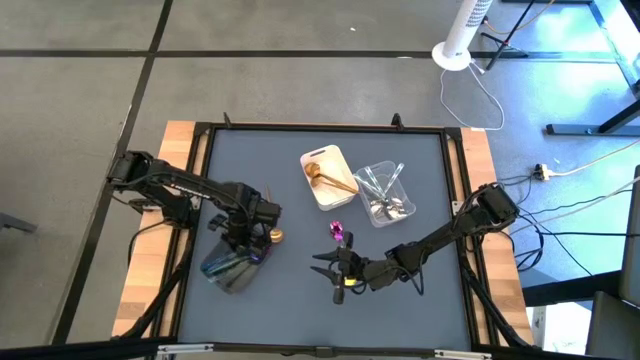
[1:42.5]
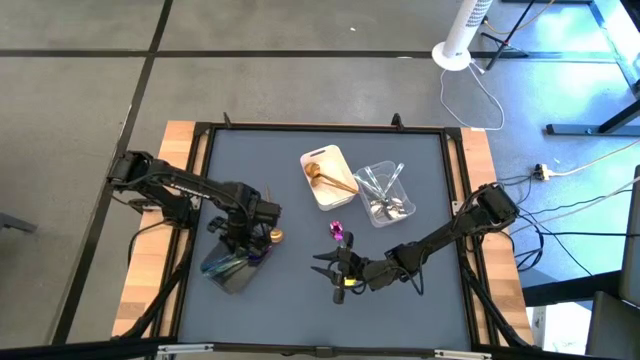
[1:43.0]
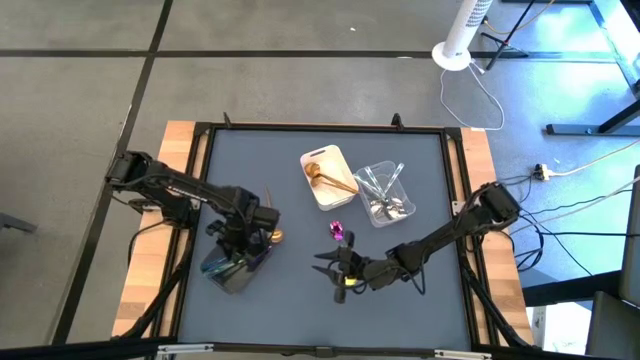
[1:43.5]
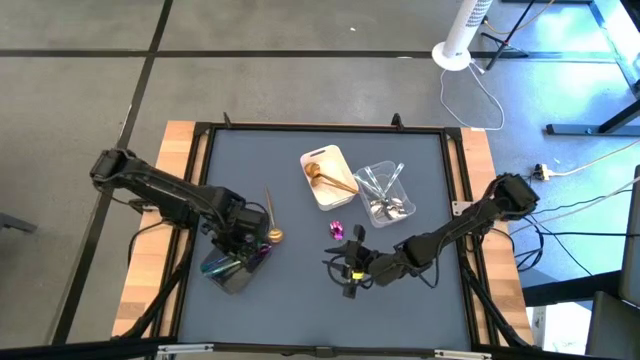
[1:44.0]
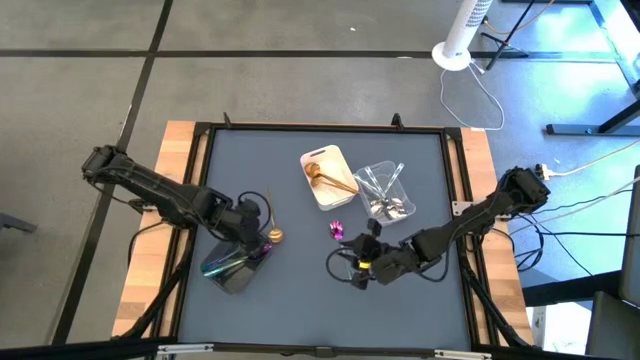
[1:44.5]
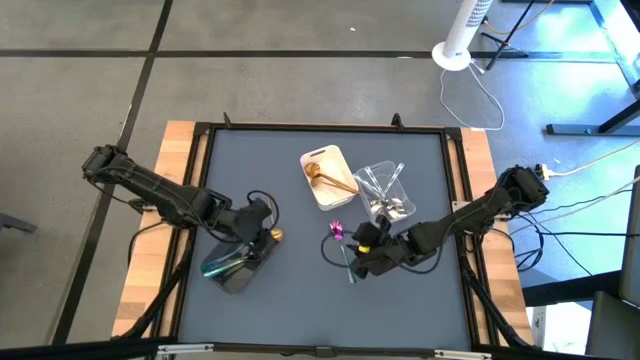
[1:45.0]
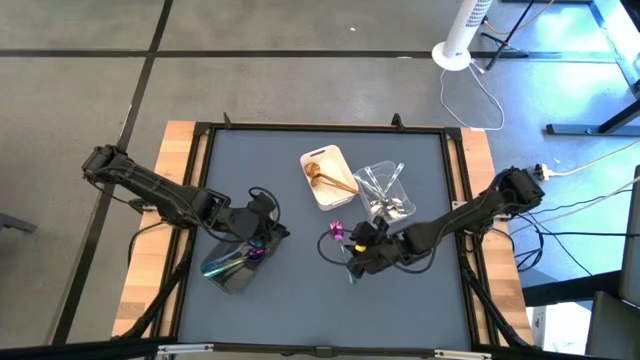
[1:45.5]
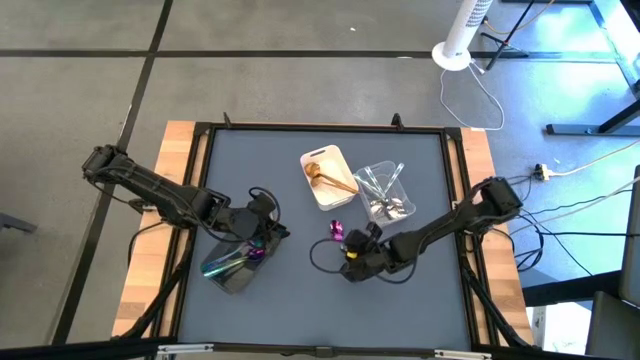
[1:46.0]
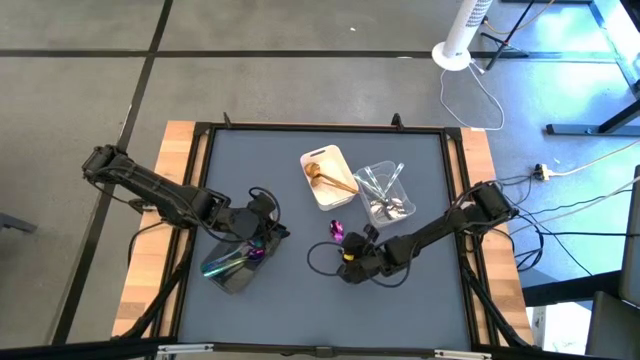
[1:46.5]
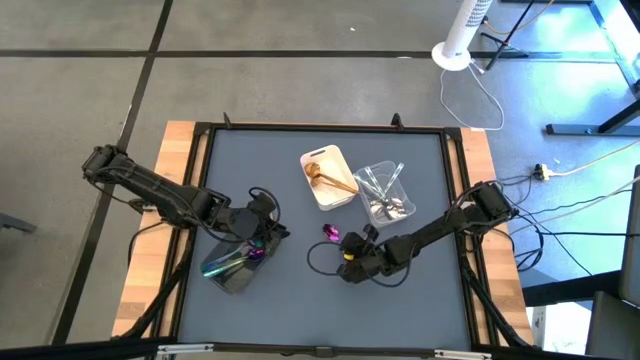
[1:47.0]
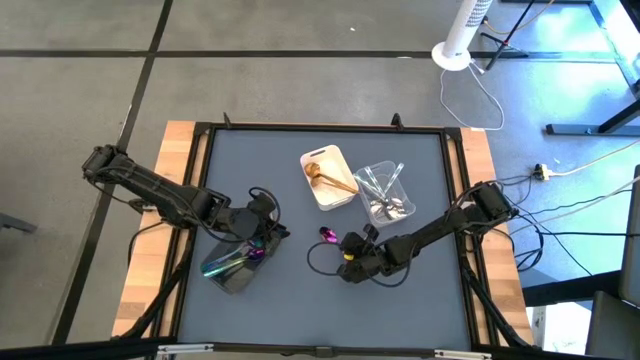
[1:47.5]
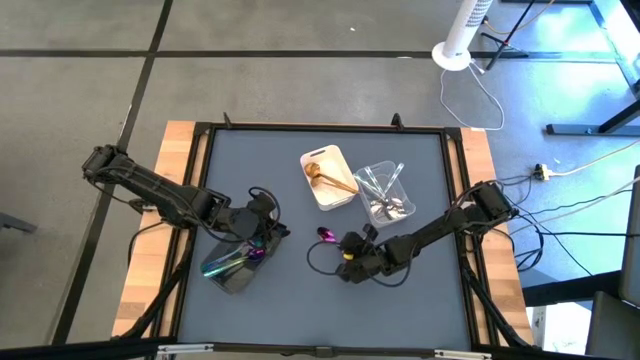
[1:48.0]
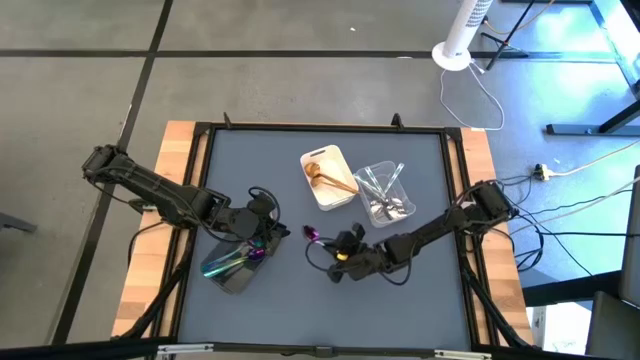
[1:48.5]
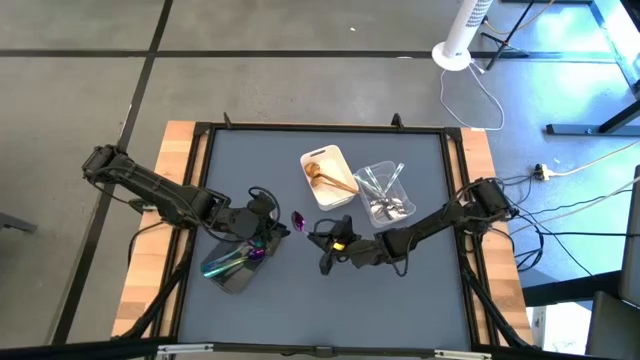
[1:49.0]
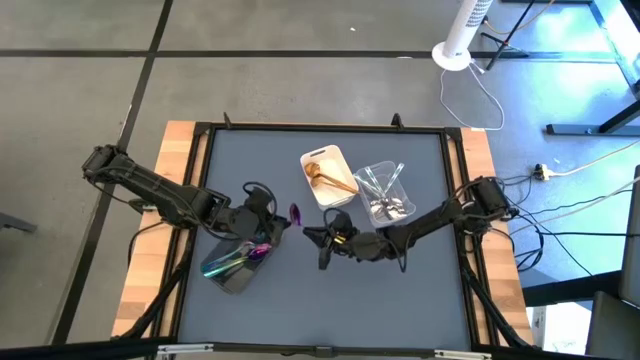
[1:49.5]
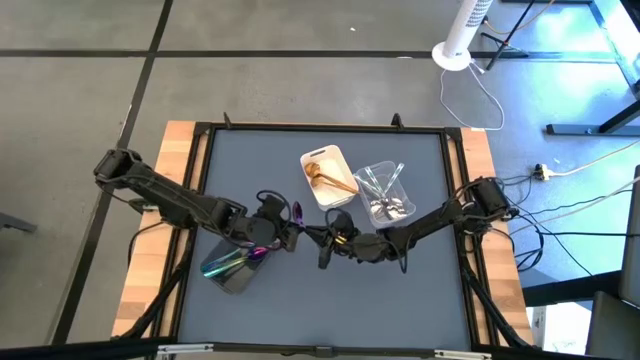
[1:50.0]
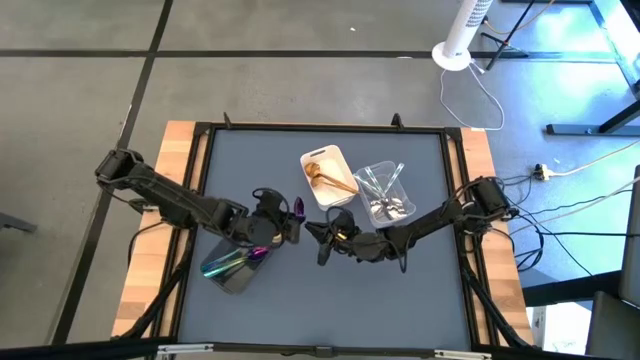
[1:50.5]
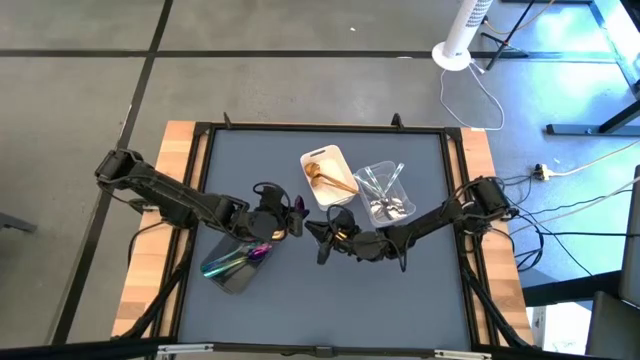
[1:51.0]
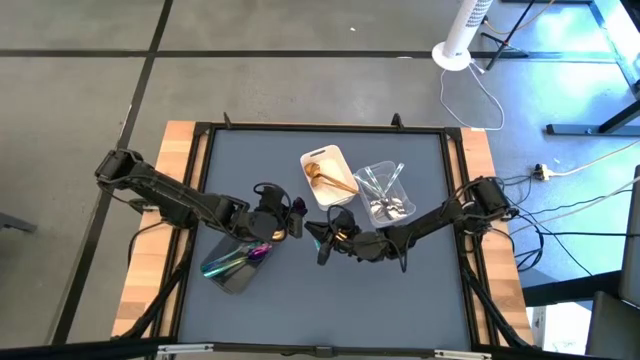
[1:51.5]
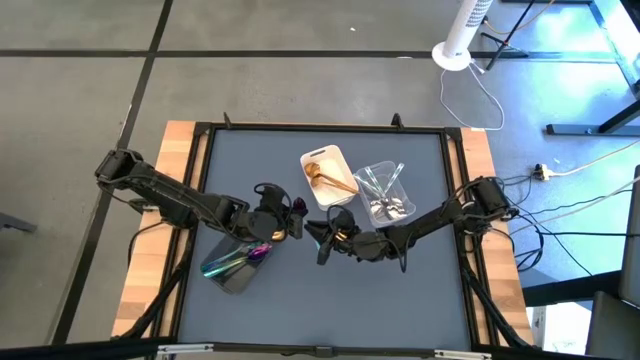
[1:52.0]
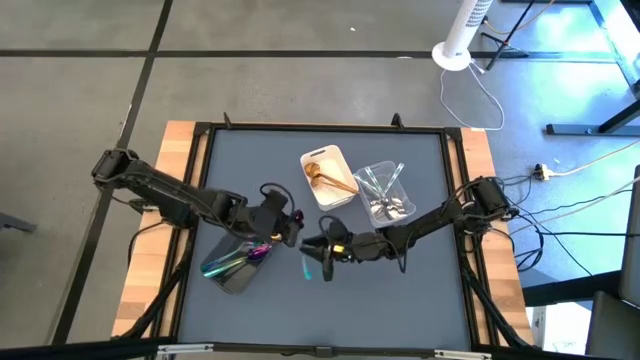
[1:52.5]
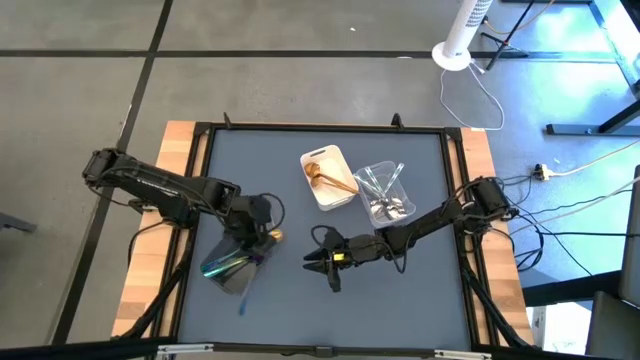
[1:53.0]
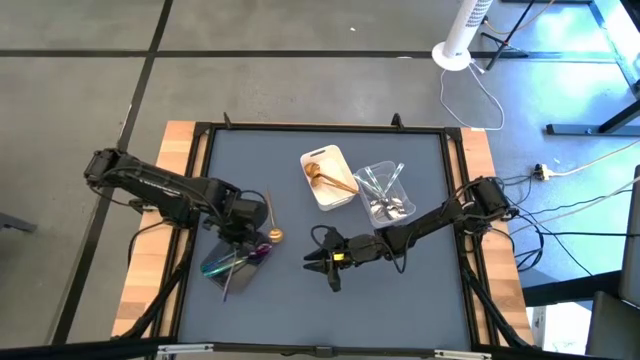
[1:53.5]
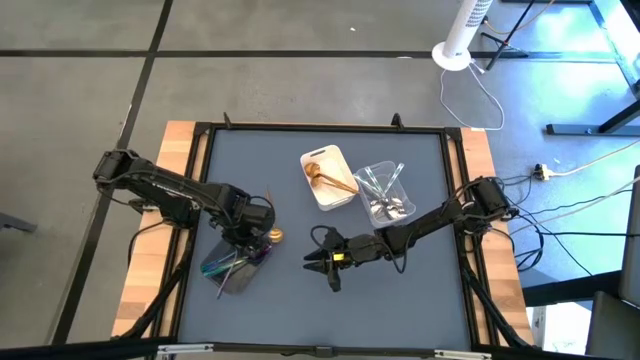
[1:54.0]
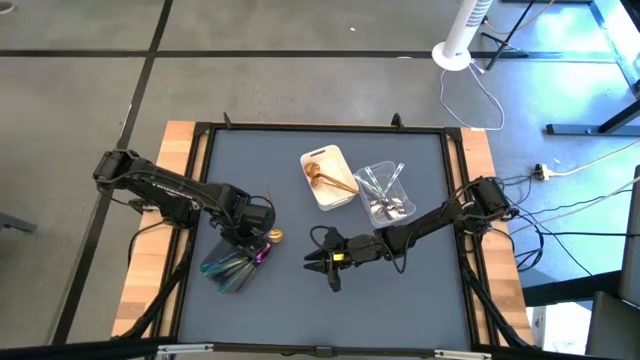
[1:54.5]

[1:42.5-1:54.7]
Task: Sort silverware by color (type)
Put the iridescent spoon into the black bin

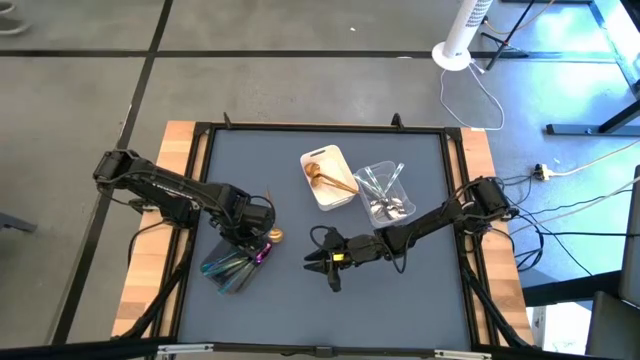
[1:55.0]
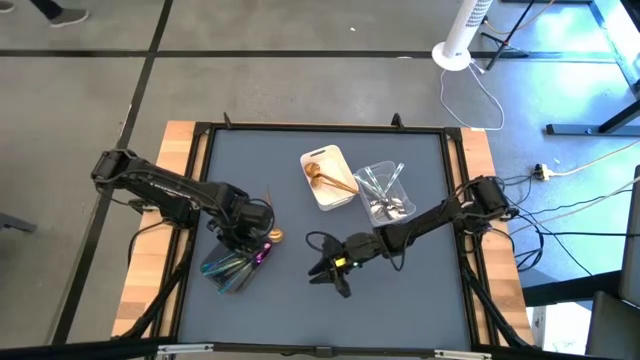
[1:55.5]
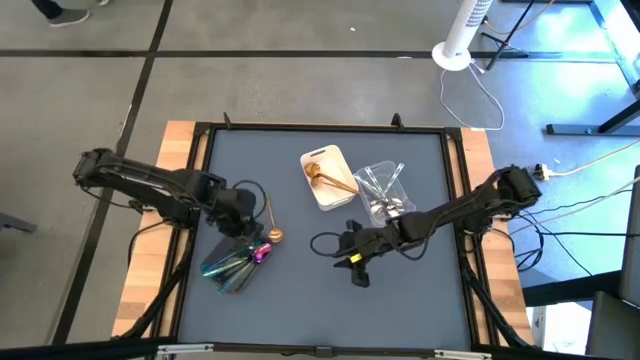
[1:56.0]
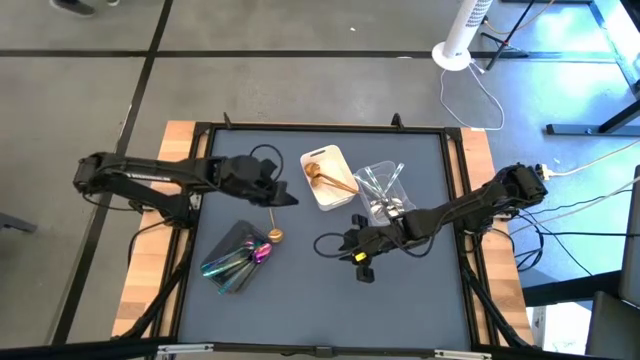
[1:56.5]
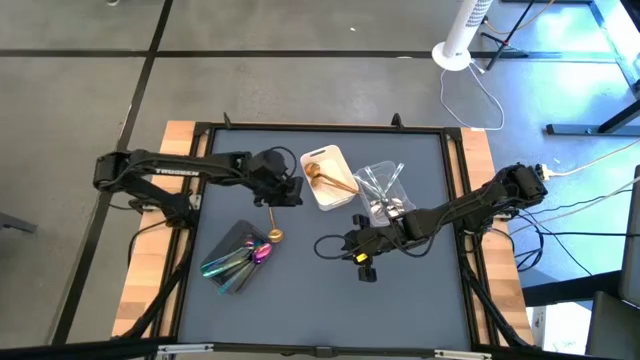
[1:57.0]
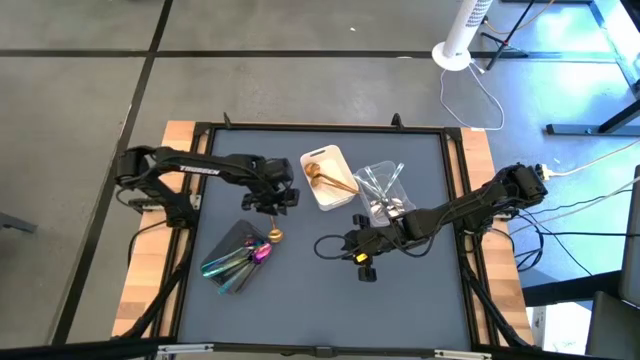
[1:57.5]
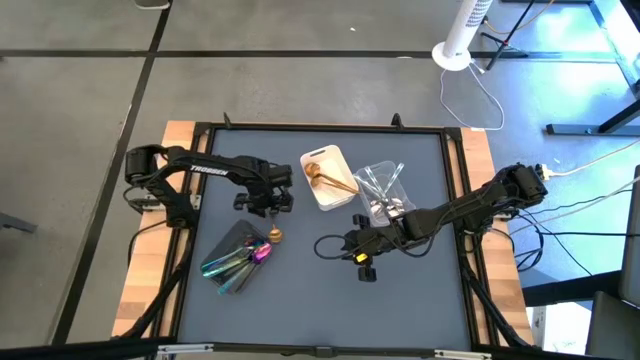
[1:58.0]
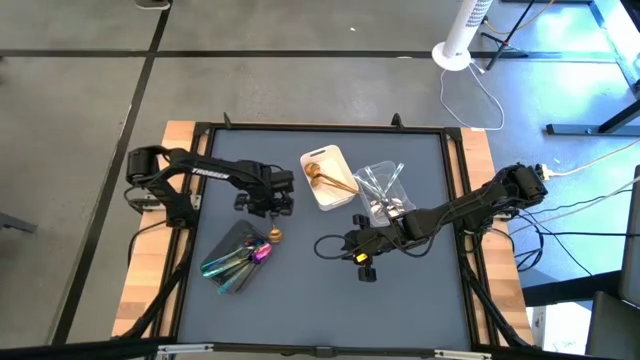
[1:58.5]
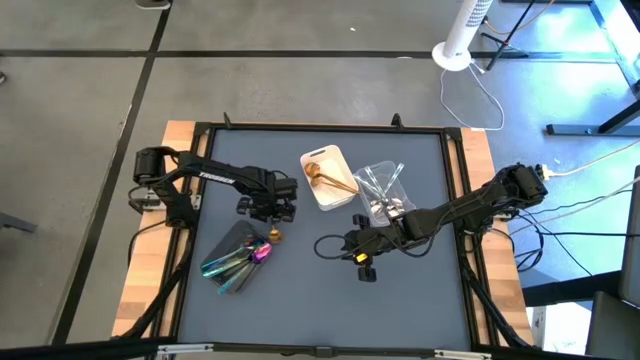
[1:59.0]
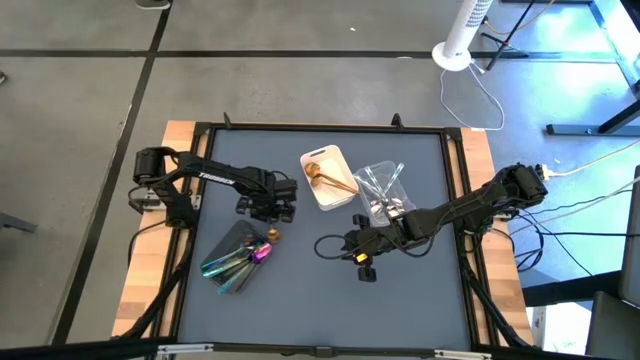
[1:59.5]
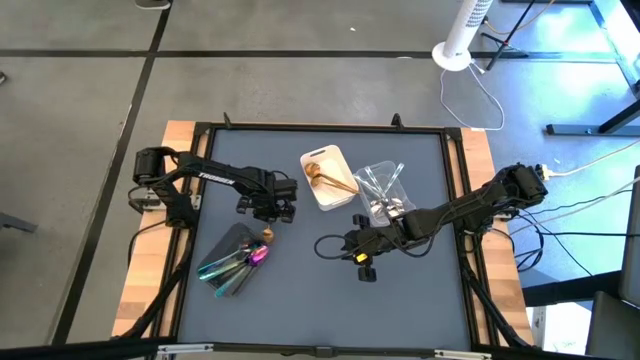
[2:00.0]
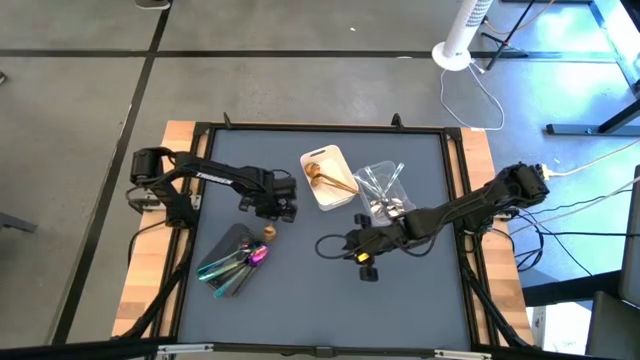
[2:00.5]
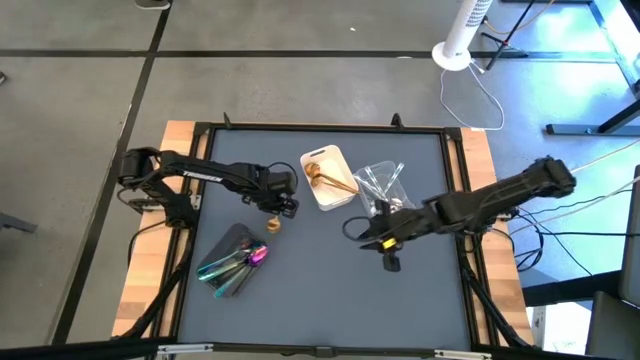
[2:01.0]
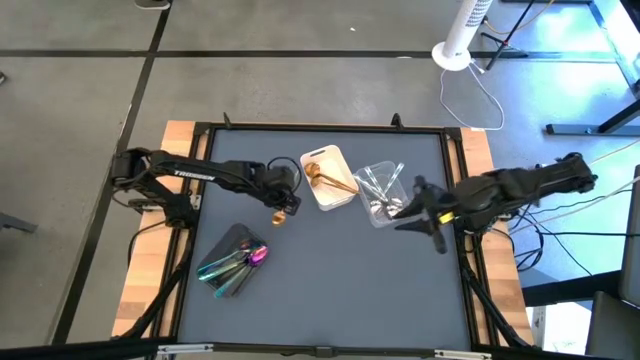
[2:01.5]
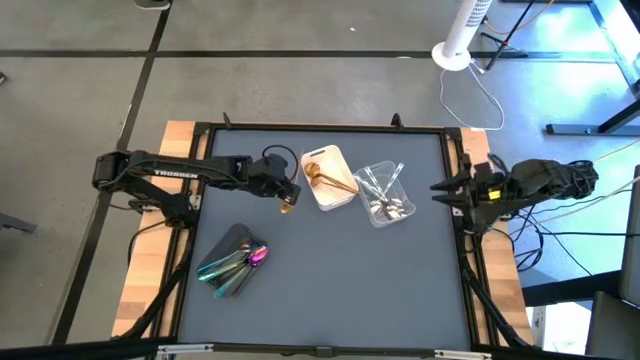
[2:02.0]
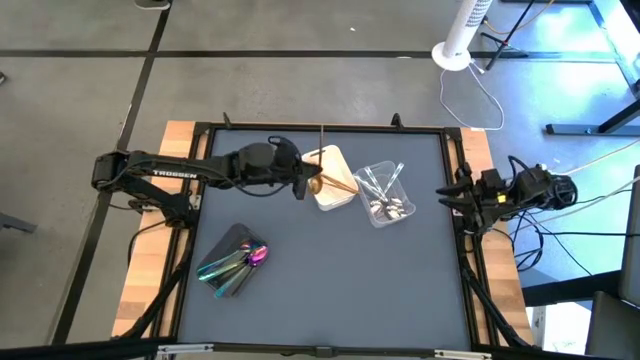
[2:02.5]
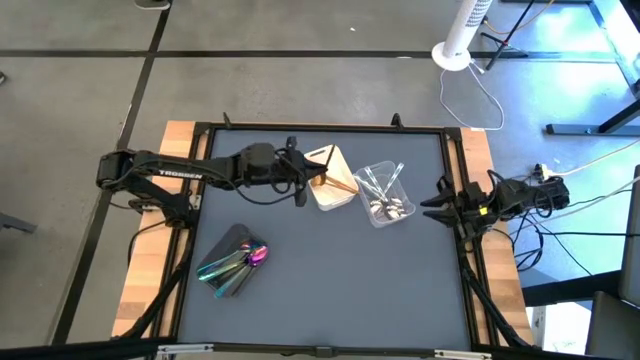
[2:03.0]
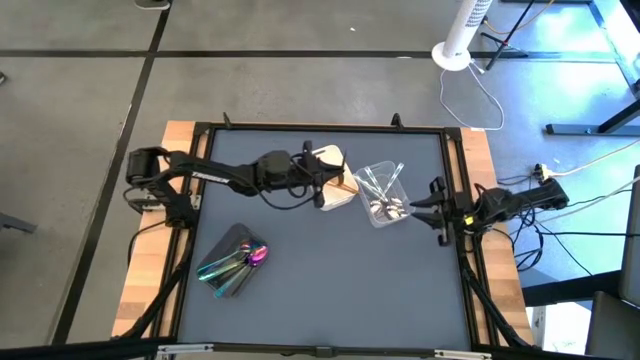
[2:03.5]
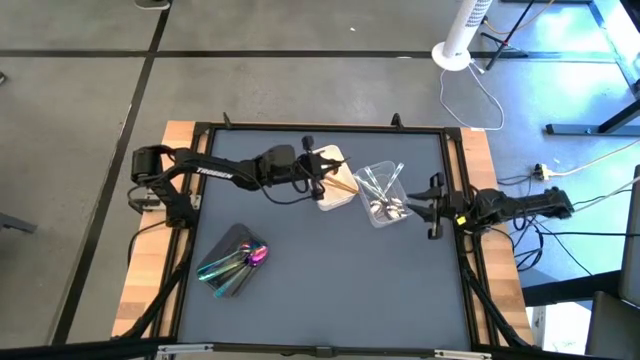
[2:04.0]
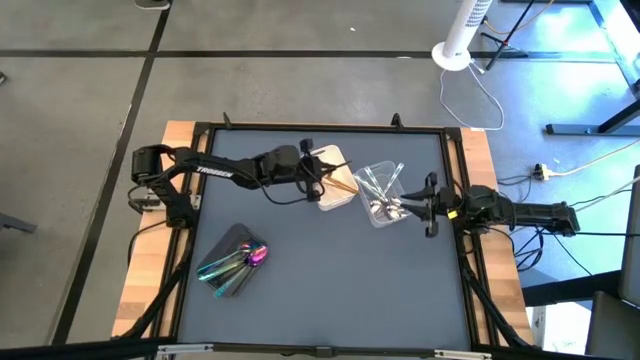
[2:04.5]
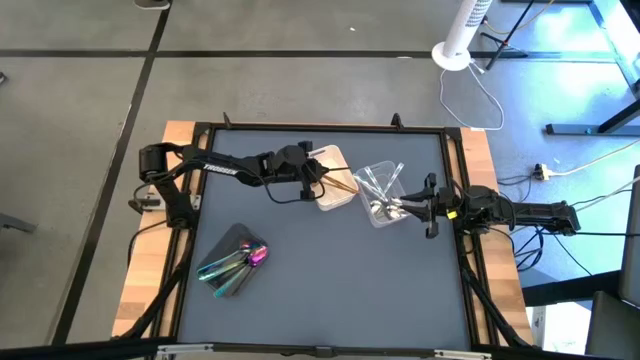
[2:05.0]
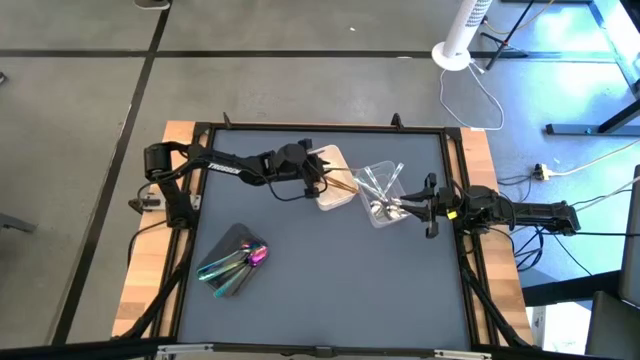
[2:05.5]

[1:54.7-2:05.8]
Put the gold spoon into the white bin
